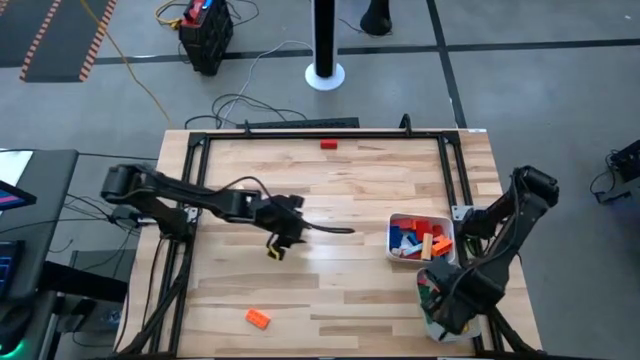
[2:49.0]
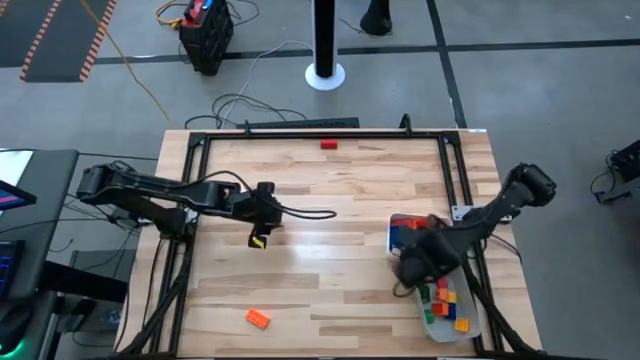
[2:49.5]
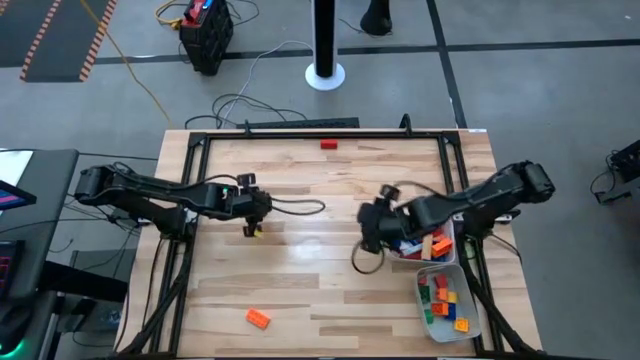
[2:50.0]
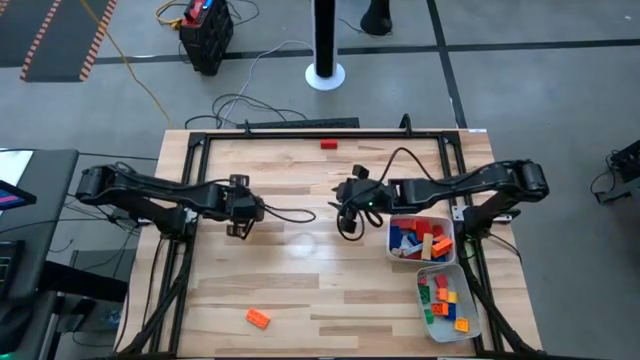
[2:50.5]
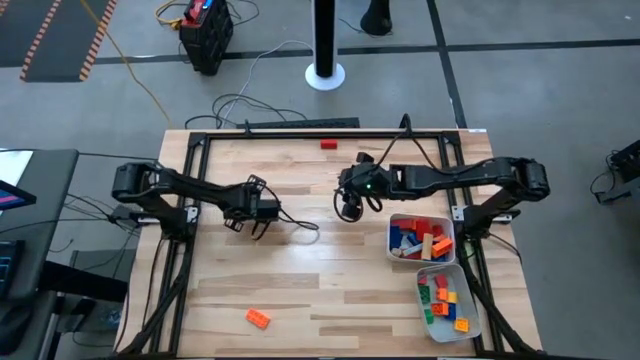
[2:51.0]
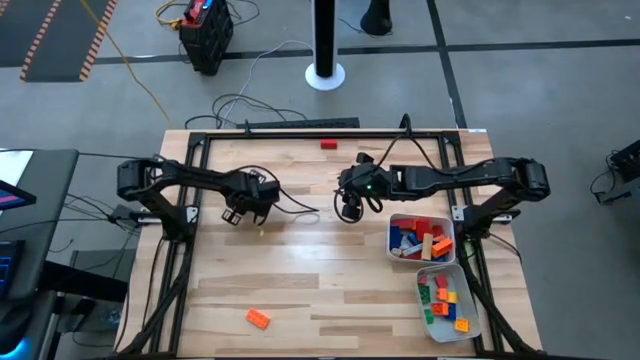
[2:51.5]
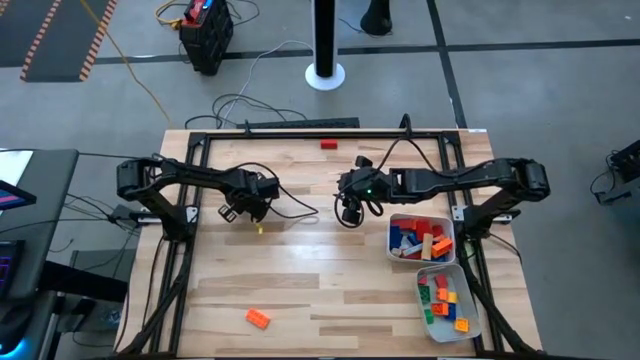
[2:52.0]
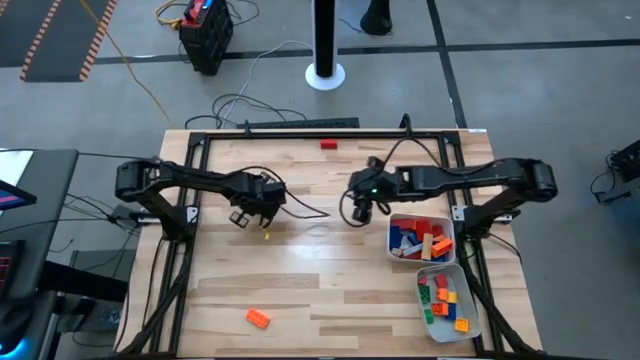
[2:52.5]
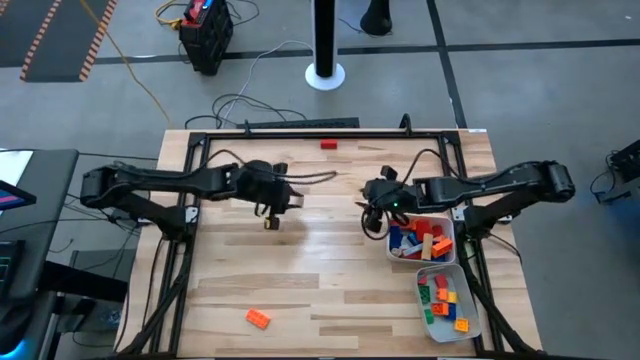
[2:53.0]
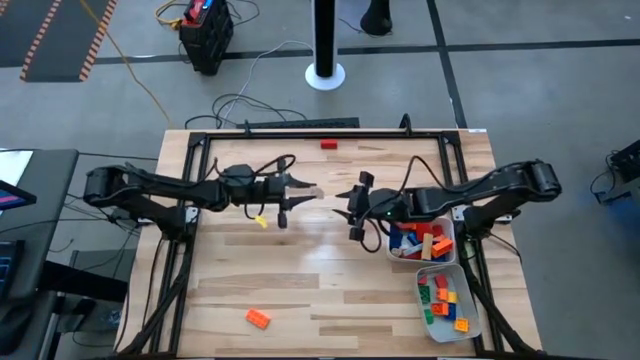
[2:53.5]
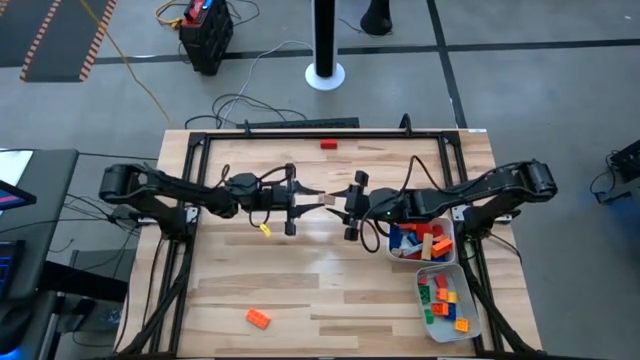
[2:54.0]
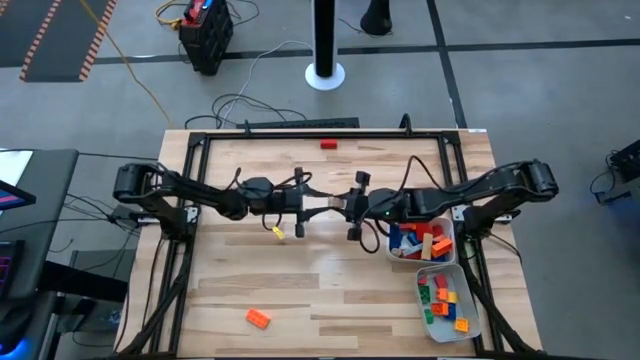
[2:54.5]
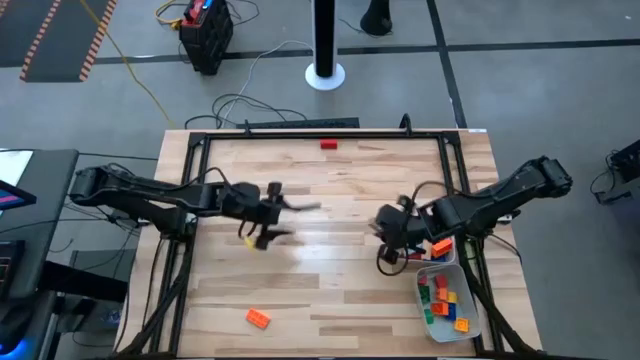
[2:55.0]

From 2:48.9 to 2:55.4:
Task: Sort blocks by size
Put the wooden block into the white bin

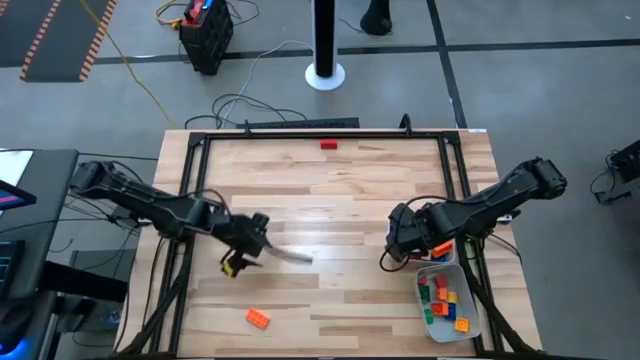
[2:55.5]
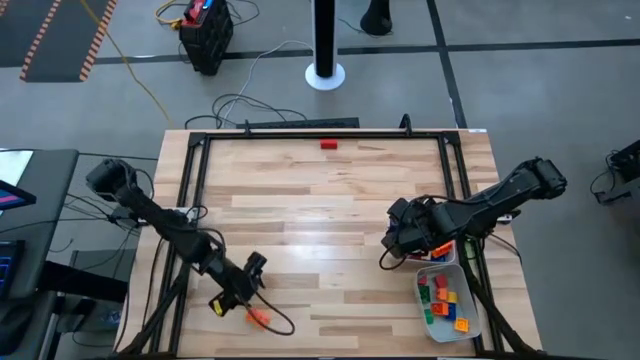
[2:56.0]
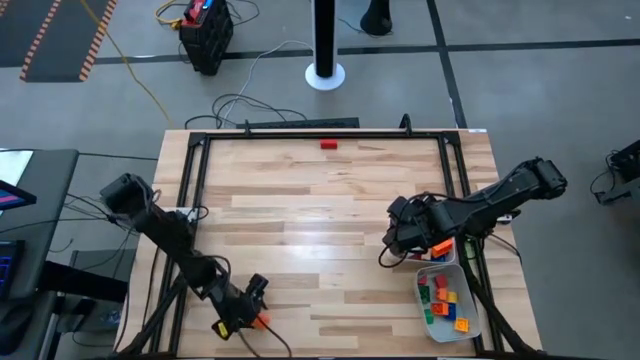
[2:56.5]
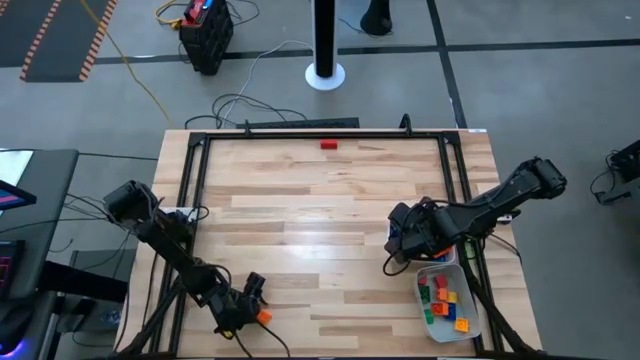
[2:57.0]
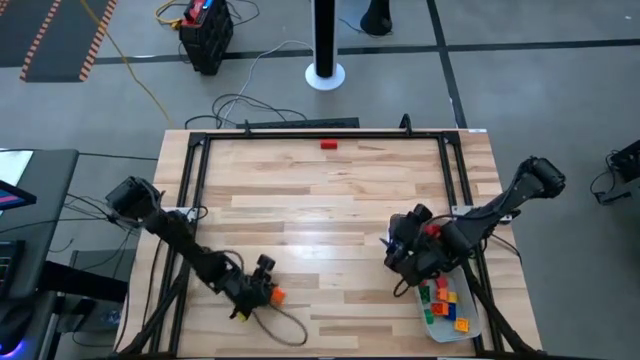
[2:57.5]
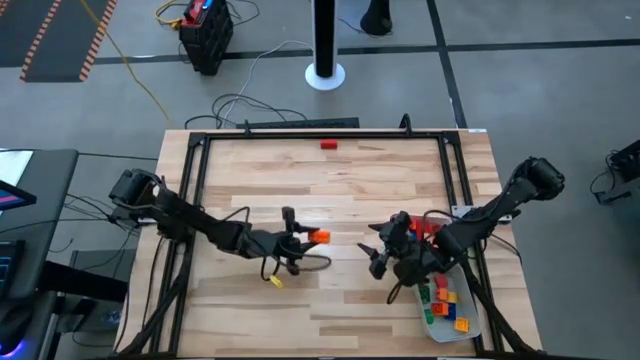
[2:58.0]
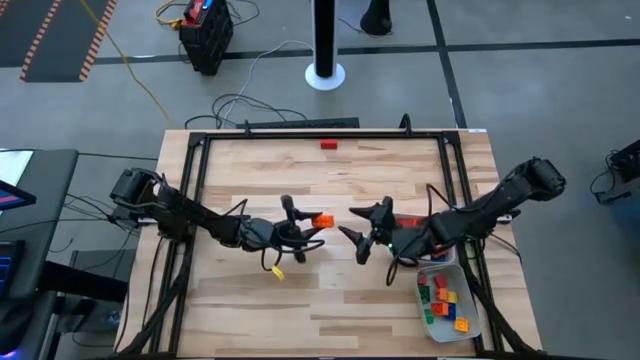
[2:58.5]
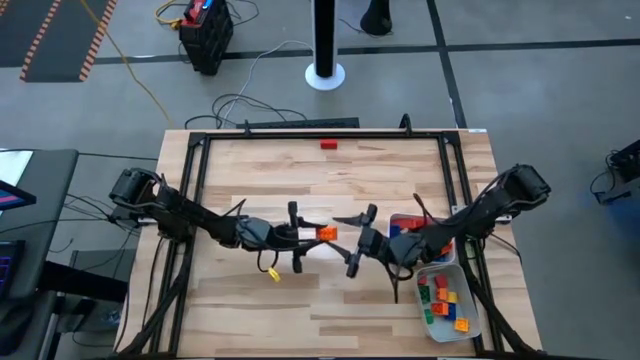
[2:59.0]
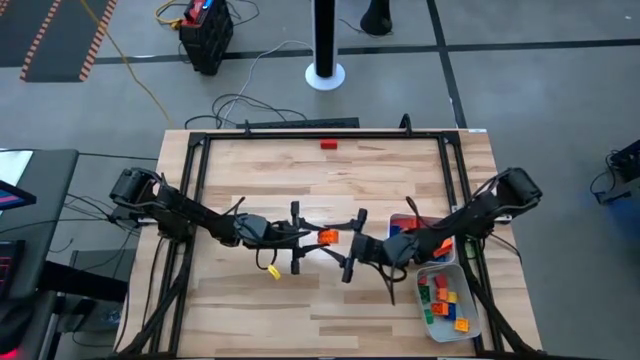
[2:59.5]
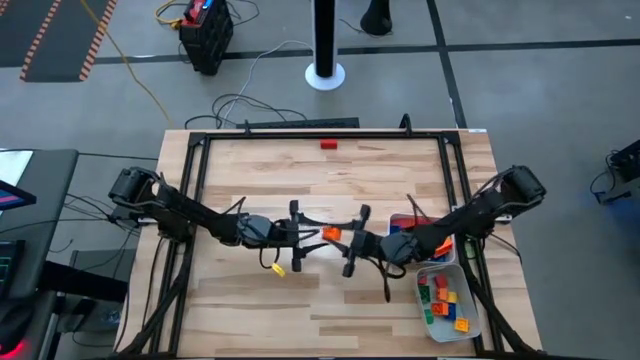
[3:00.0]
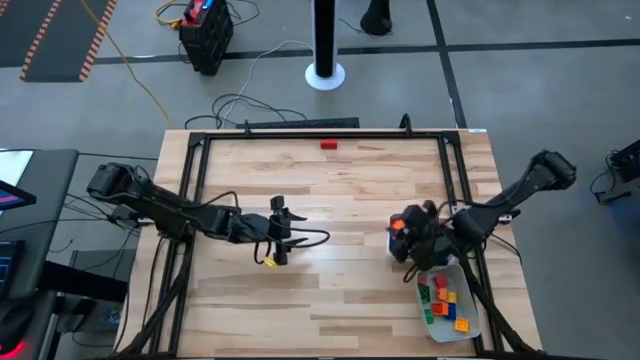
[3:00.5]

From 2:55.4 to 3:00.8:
Put the 8 stud orange game piece into the white bin

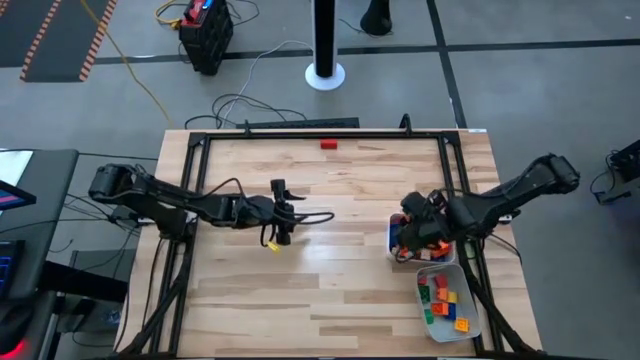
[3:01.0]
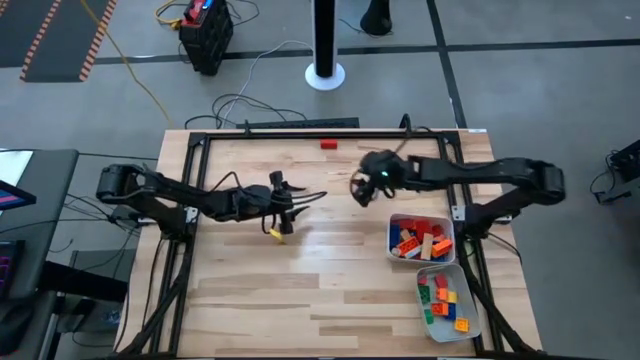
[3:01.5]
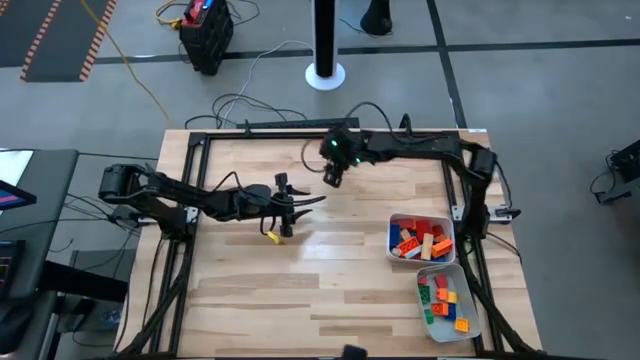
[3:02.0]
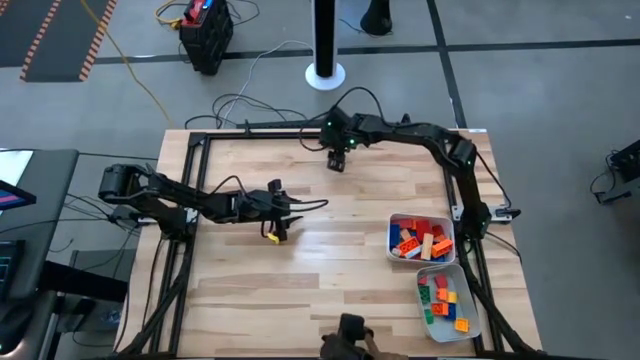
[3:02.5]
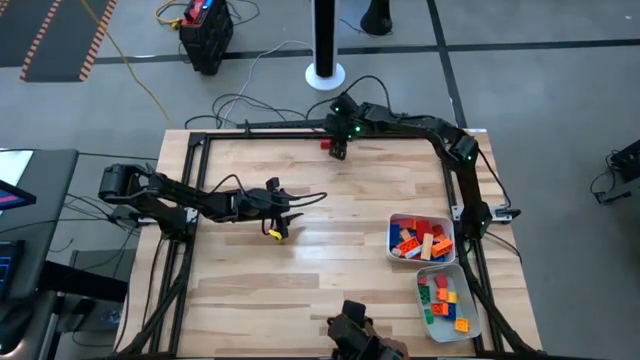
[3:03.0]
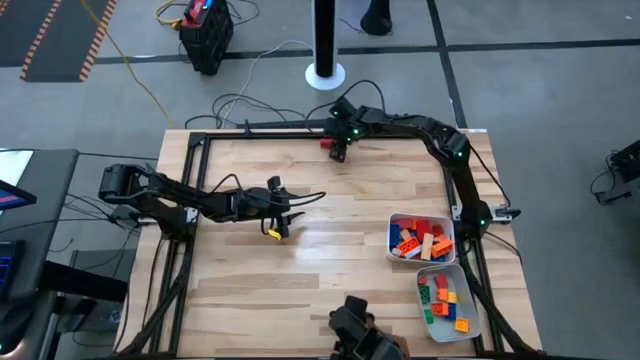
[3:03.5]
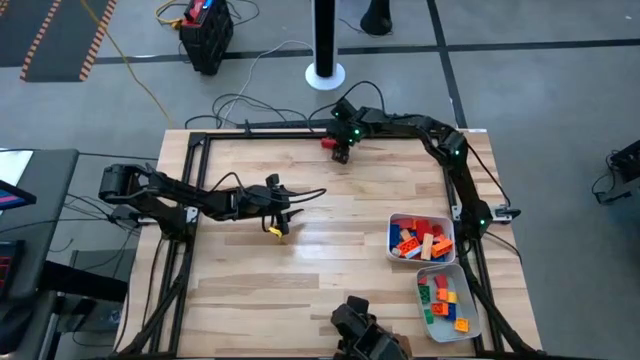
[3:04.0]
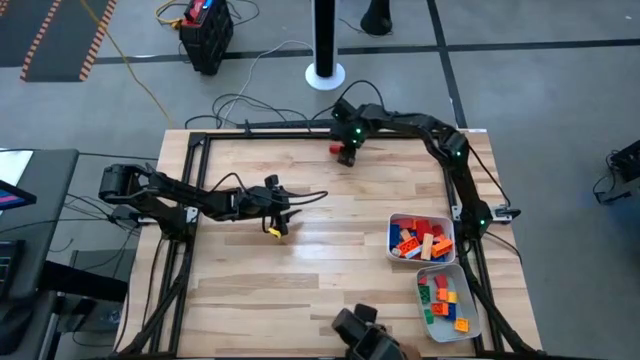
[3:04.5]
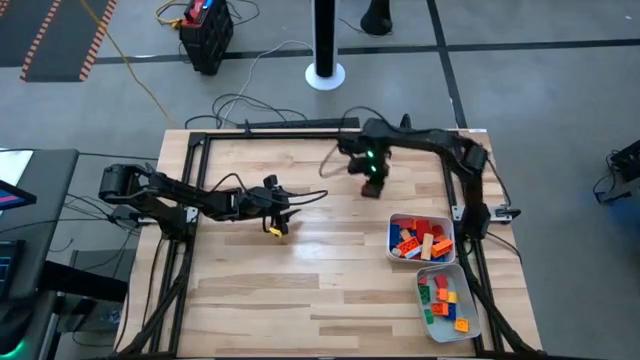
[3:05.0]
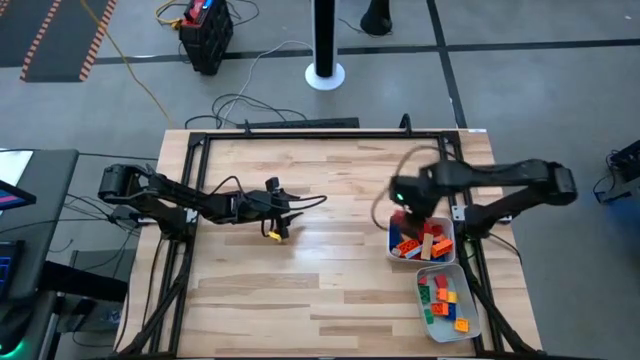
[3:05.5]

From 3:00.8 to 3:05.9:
Put the red block into the white bin

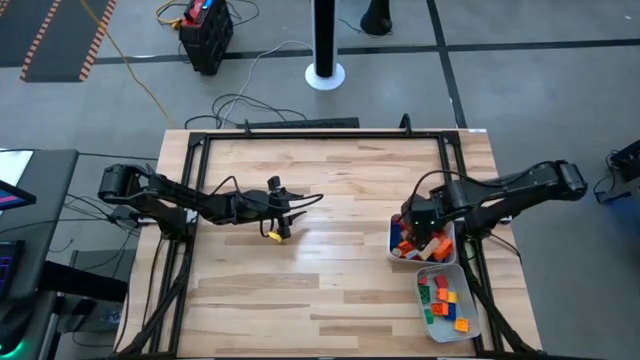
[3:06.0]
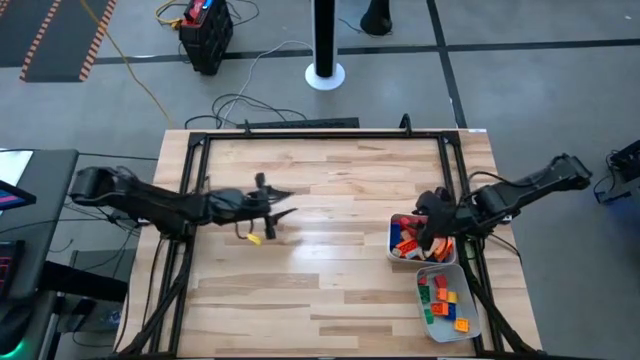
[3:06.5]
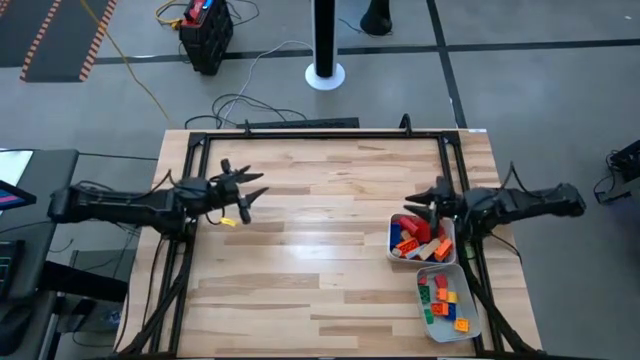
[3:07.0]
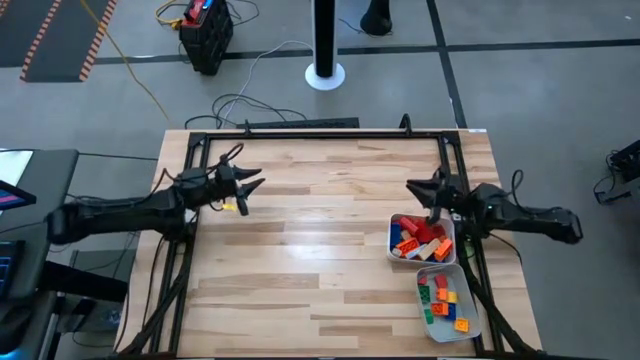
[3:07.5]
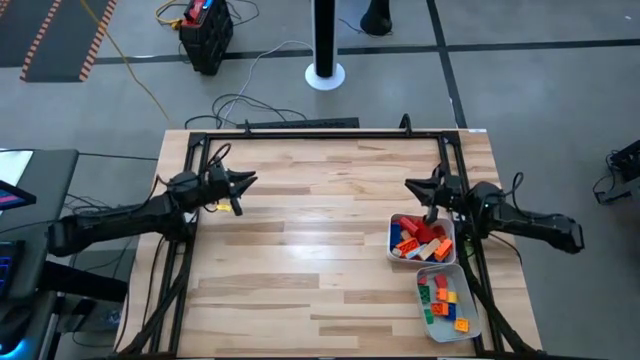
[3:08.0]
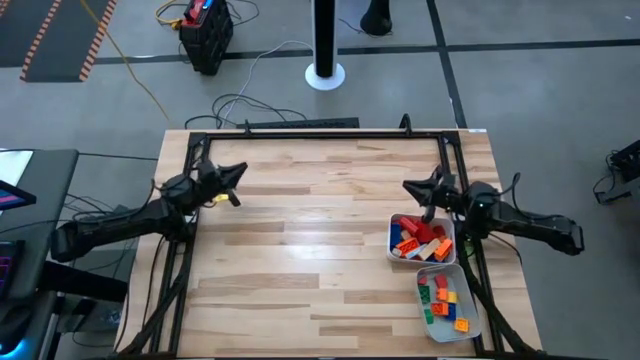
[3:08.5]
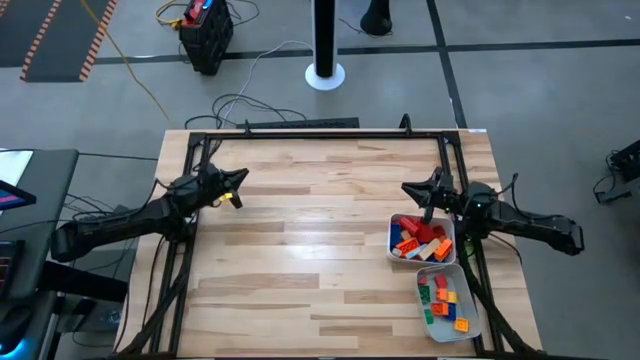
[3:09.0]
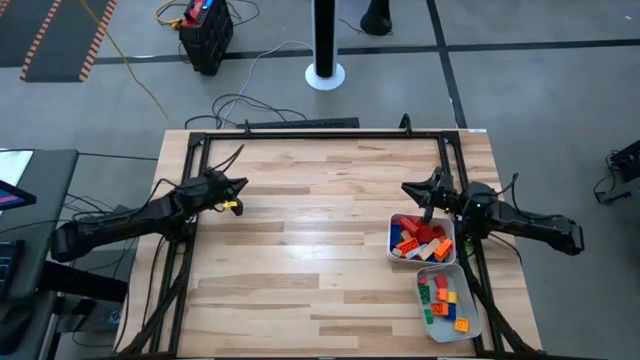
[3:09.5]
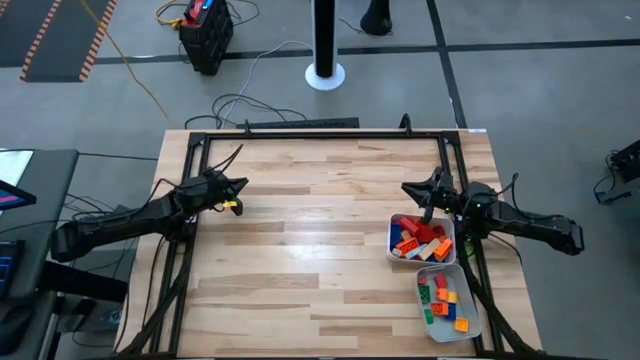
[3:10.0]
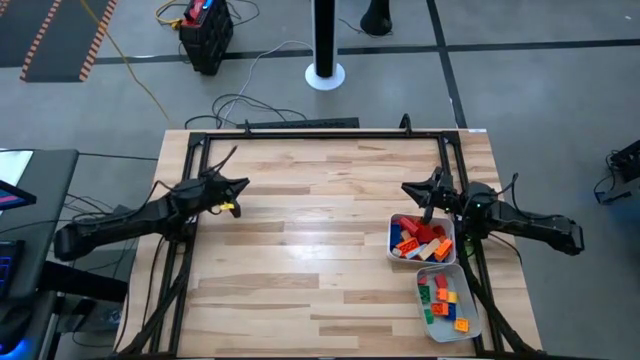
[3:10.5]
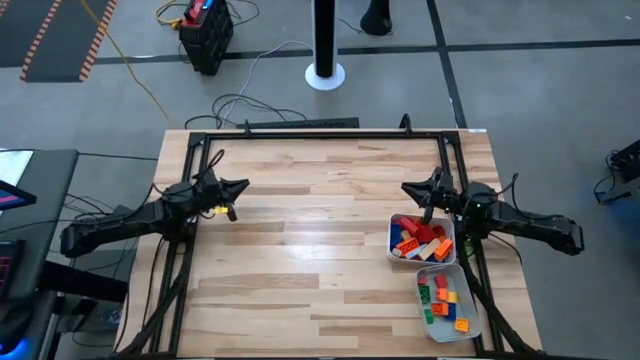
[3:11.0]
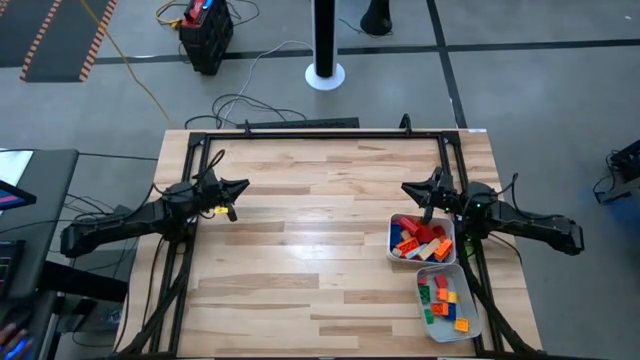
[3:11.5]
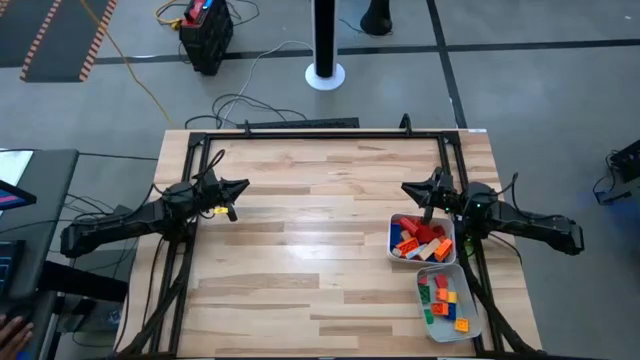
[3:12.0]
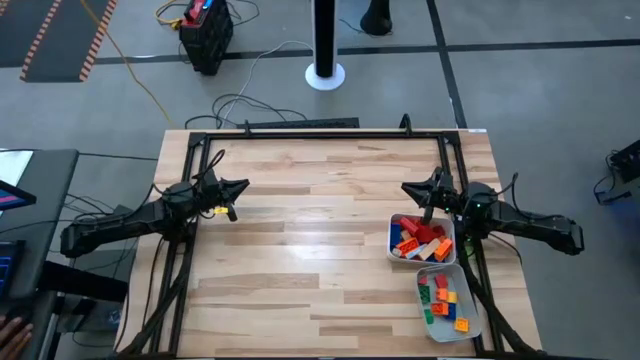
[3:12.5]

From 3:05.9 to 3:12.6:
Return to Home Position
